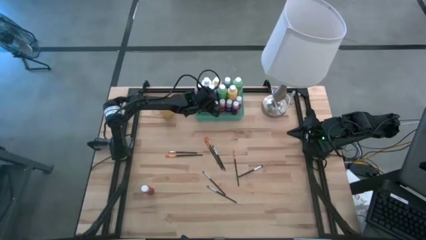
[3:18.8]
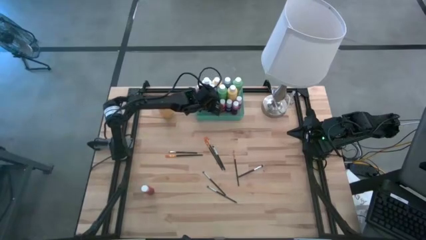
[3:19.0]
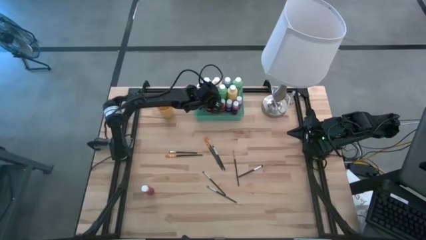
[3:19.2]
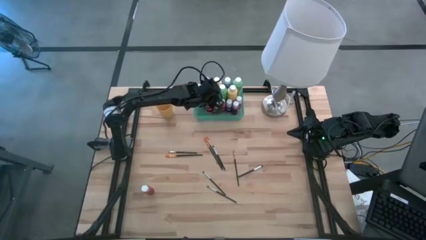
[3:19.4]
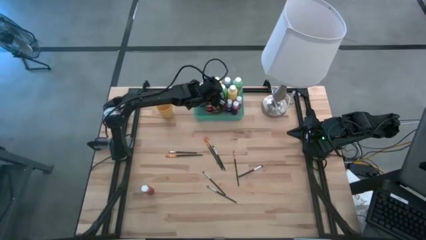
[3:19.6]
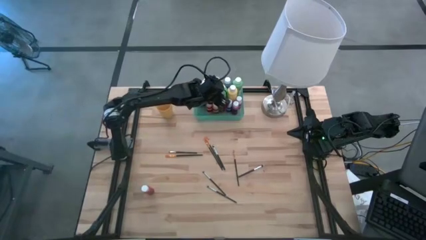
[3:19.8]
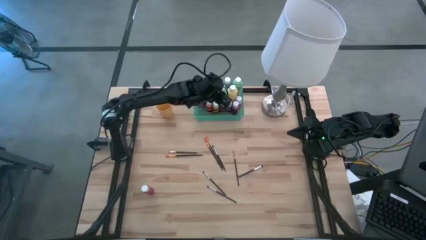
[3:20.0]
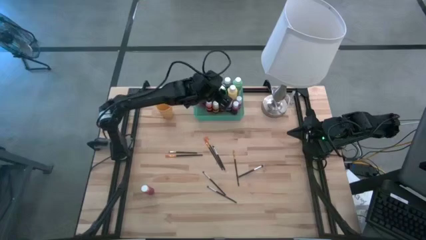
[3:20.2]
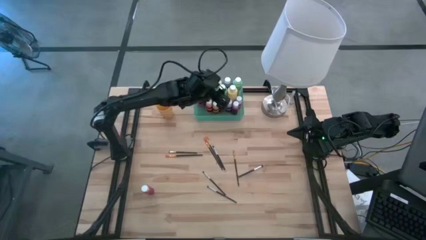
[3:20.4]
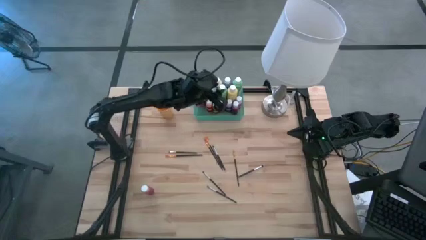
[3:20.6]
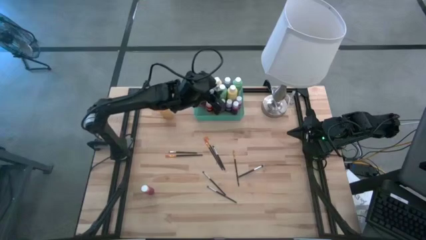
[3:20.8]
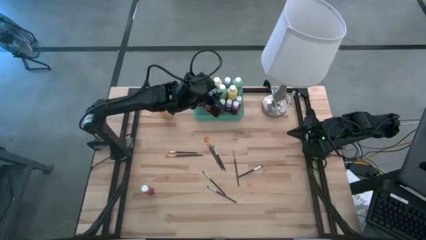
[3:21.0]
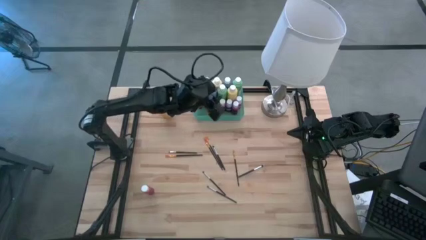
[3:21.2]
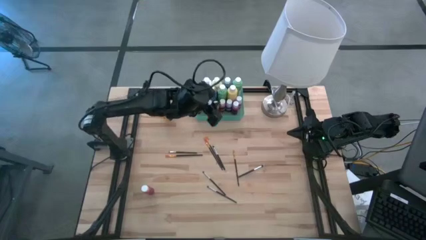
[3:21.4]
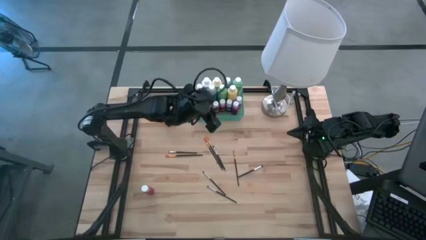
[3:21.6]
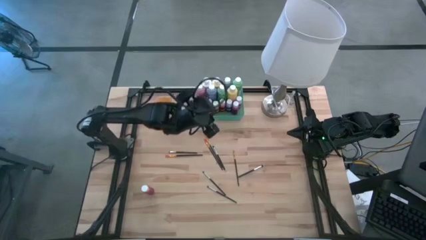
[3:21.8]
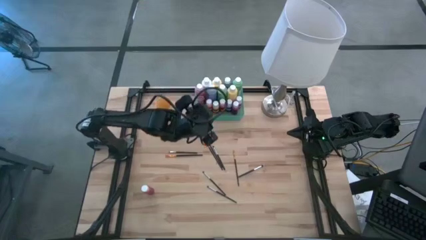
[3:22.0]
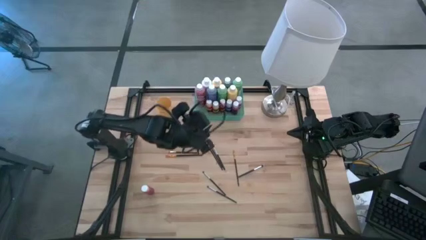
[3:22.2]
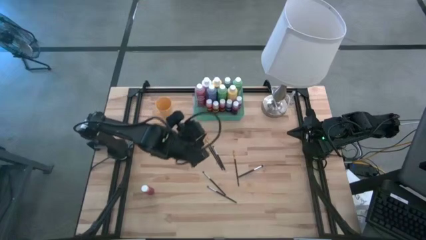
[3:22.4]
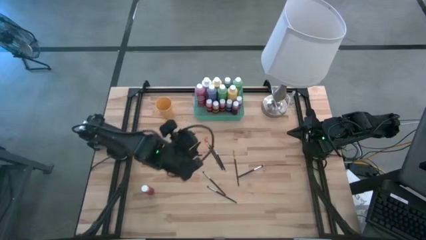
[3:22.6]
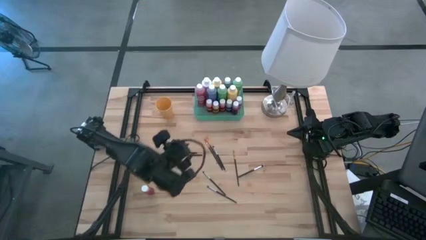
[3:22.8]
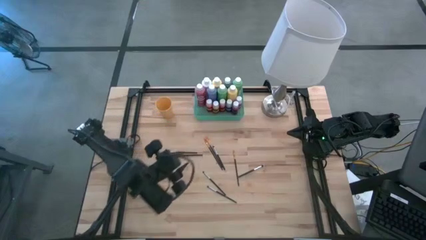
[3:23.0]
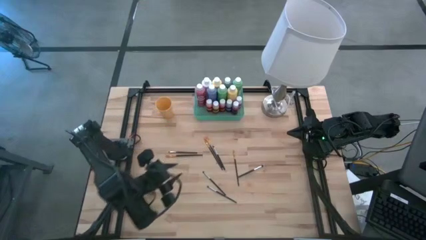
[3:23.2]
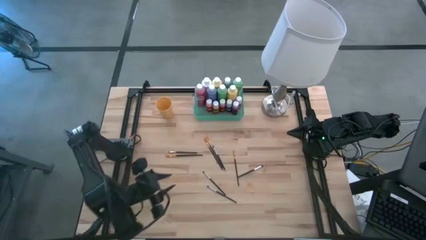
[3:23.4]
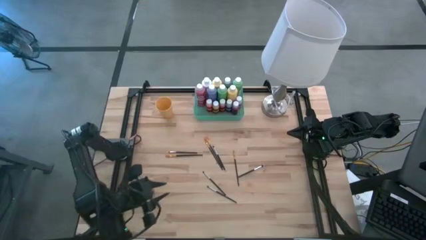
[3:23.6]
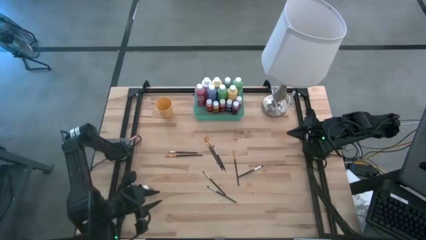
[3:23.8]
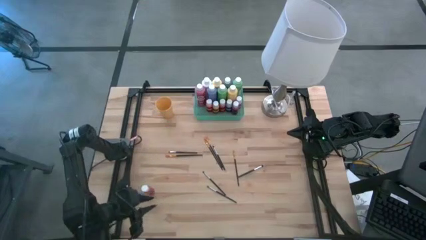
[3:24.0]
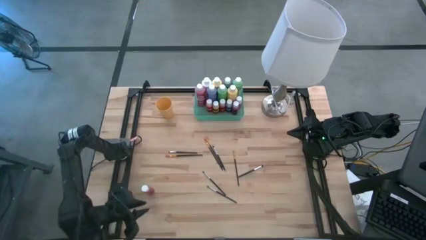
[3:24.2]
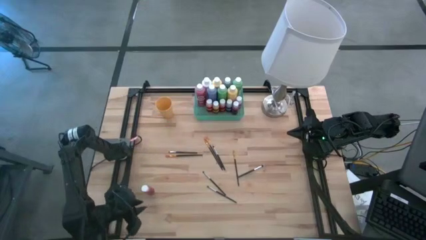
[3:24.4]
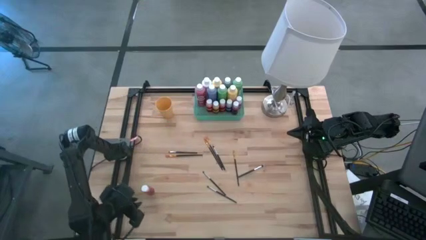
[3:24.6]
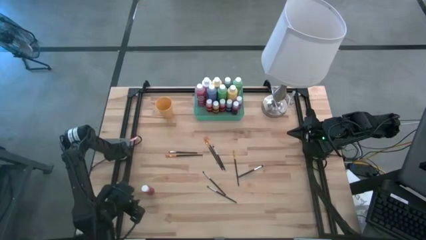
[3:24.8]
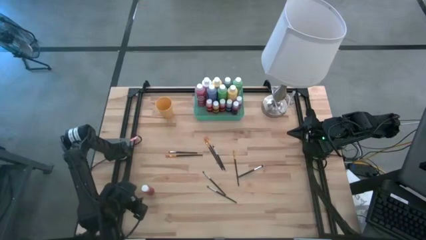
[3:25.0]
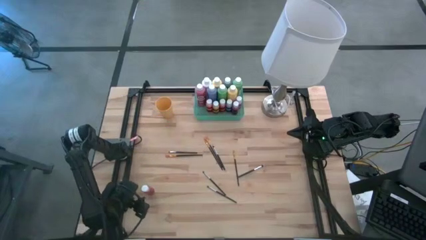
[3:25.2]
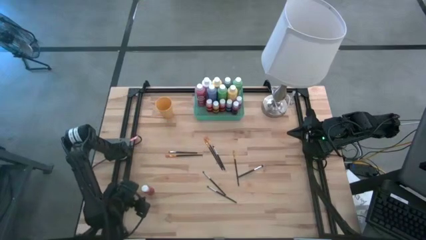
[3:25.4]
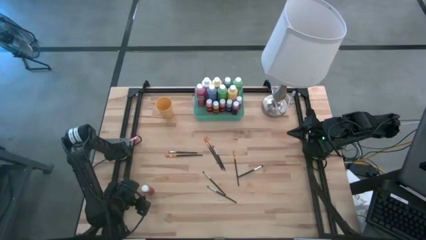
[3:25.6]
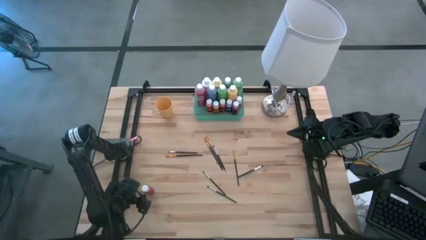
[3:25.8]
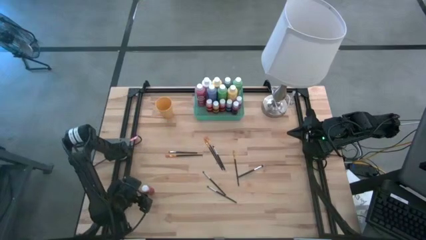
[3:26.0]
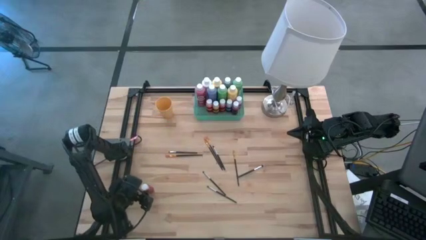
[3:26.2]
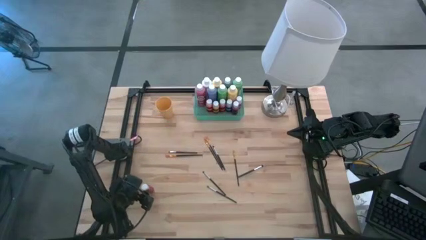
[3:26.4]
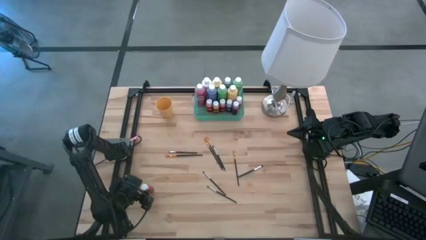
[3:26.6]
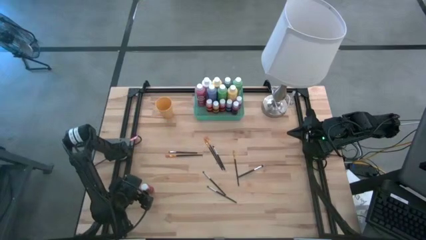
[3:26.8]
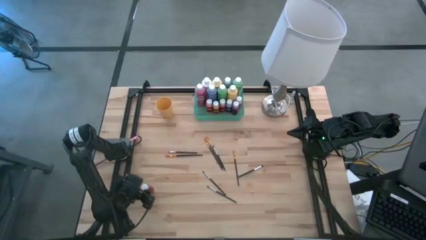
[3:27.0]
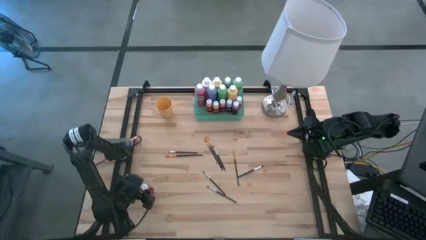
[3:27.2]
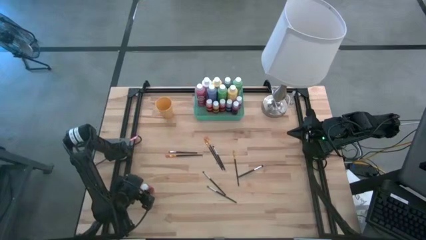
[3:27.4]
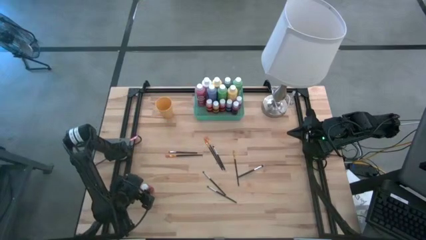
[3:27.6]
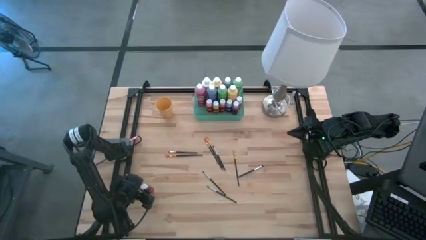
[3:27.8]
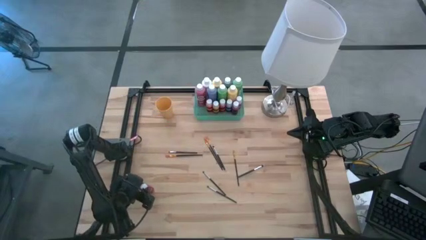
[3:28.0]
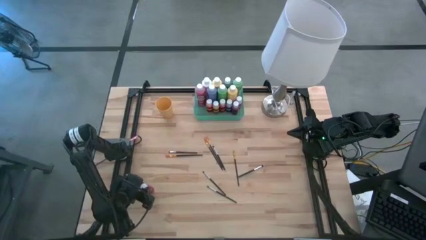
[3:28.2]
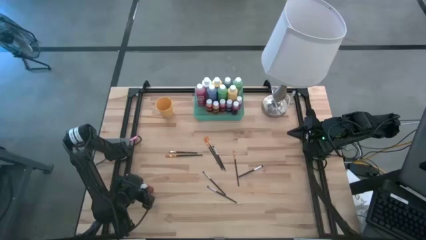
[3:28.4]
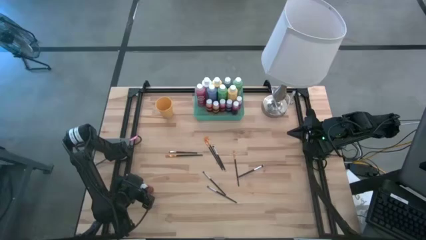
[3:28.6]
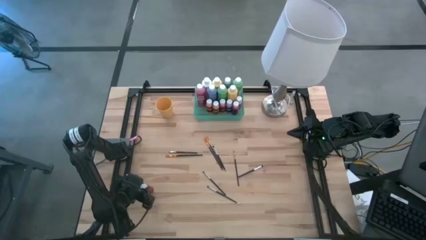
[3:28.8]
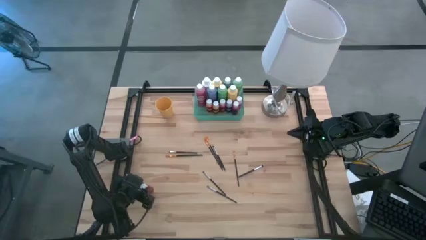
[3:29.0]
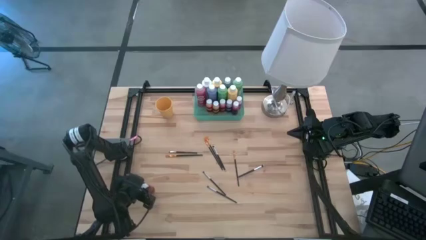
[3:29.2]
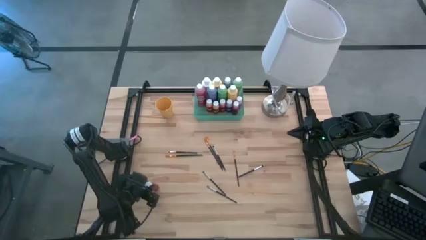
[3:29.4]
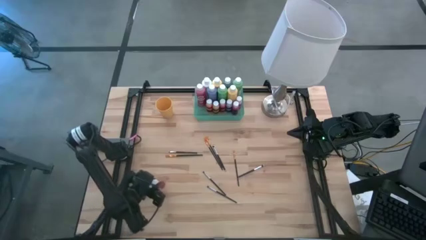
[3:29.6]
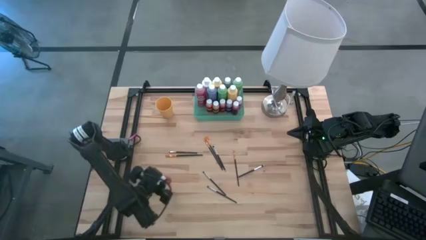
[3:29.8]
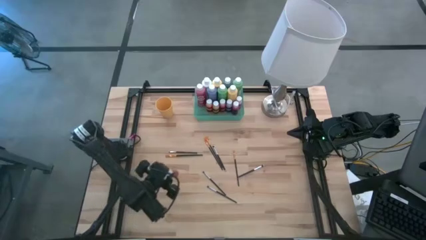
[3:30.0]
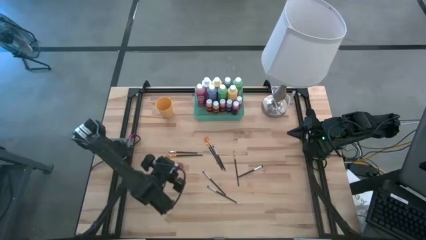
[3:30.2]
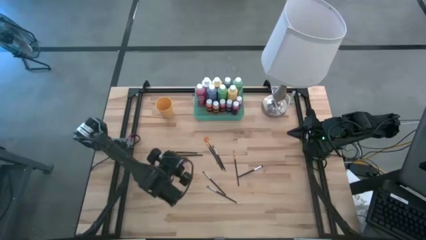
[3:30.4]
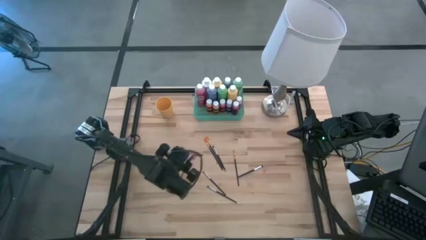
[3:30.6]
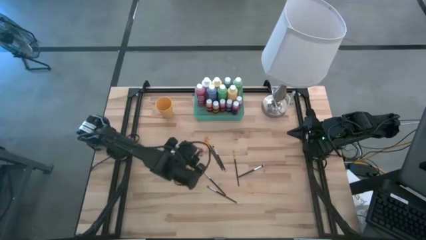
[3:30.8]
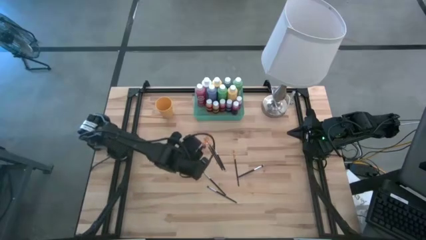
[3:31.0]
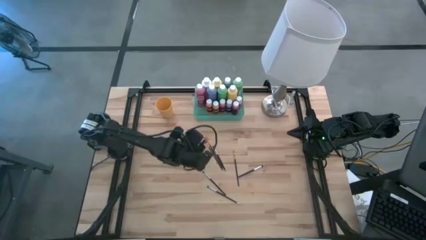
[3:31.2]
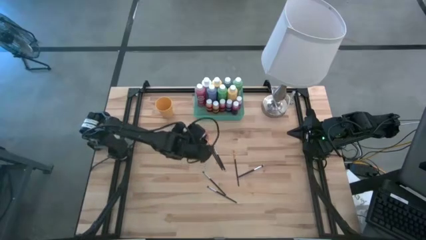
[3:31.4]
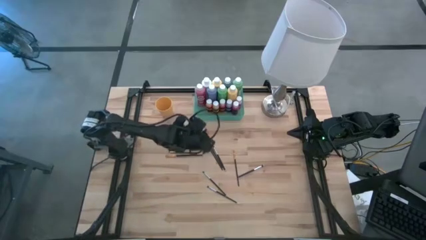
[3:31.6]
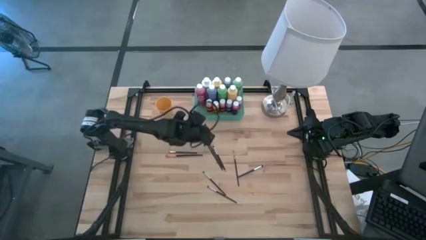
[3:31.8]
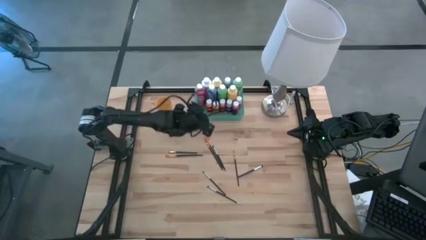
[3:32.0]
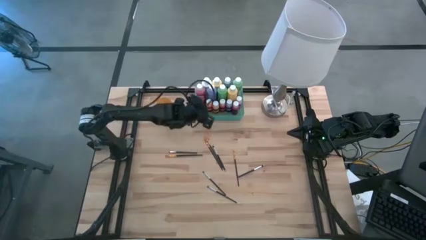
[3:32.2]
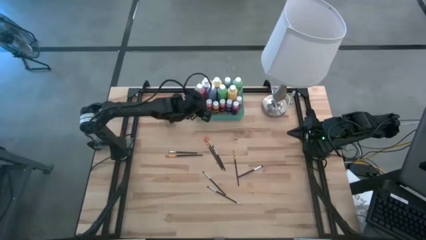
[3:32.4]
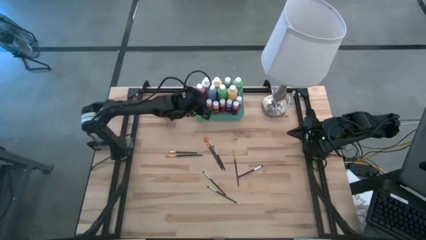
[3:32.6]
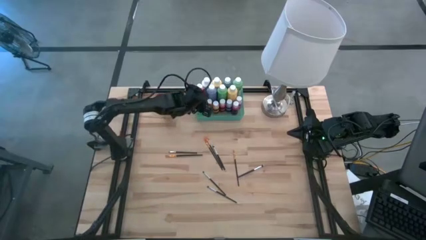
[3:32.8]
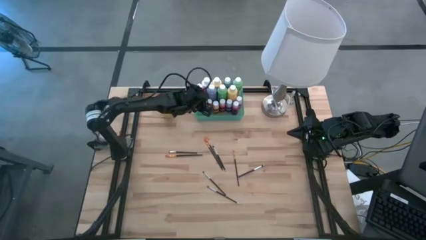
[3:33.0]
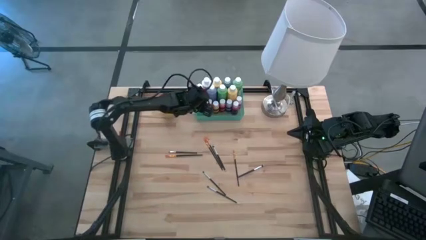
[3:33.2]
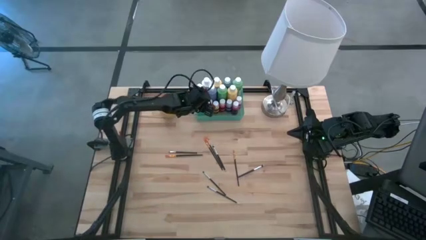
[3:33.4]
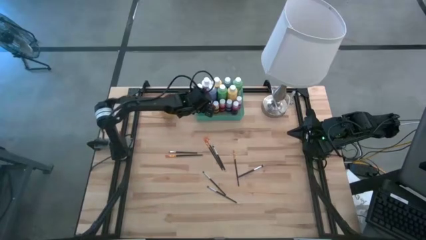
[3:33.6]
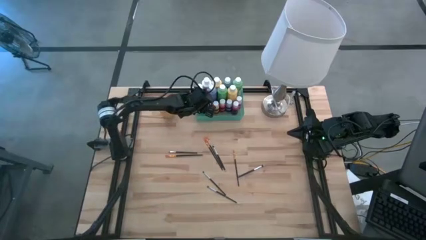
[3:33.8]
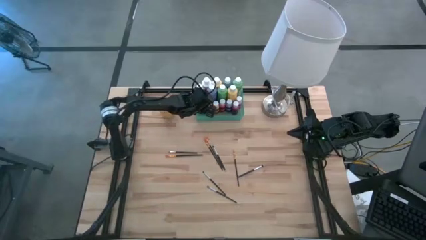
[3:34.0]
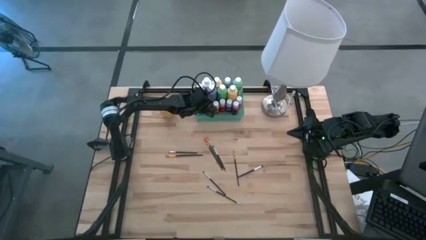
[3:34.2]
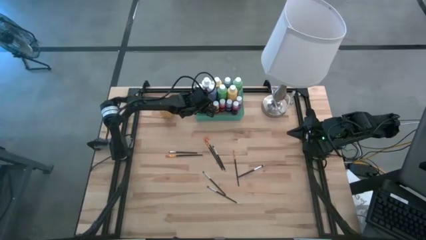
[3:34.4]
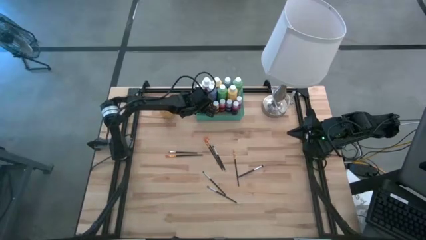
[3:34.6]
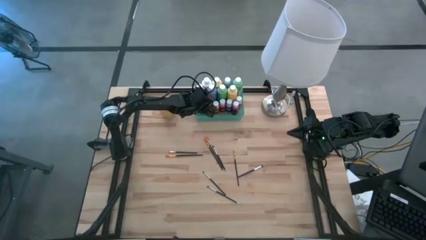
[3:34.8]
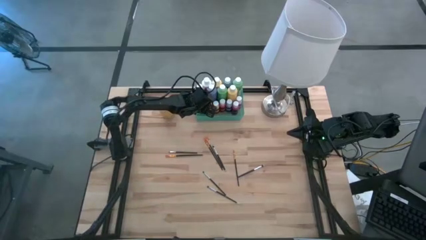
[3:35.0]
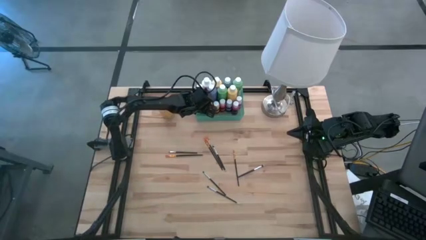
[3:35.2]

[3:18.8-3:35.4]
Task: Pick & Place Paint Supplies
Put the small red paint bottle into the green bin
